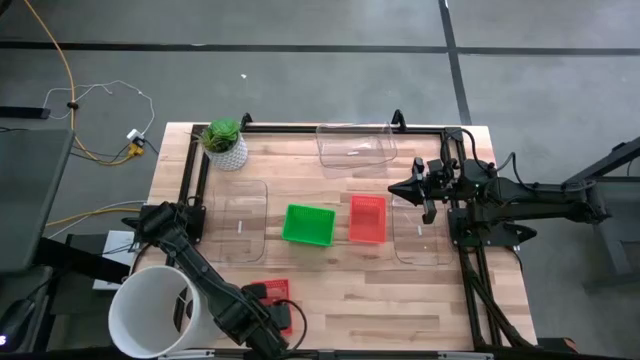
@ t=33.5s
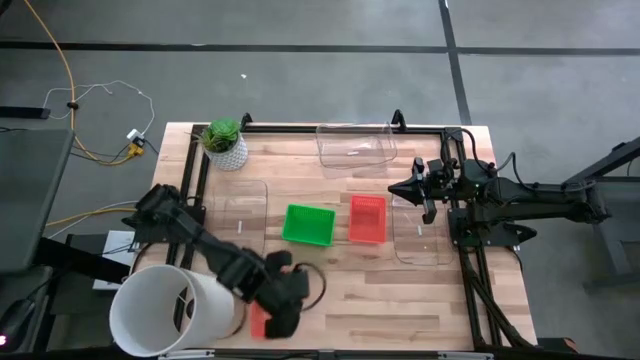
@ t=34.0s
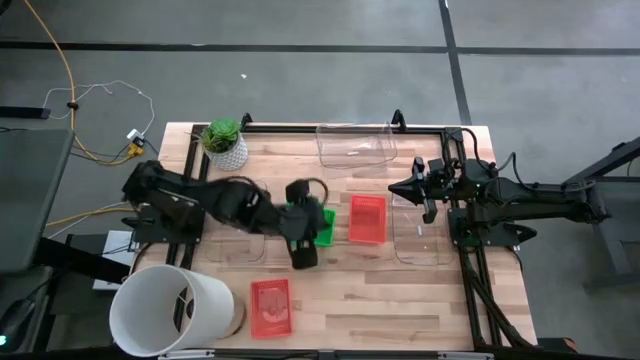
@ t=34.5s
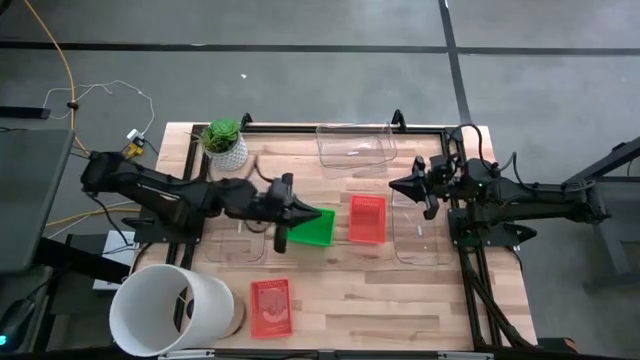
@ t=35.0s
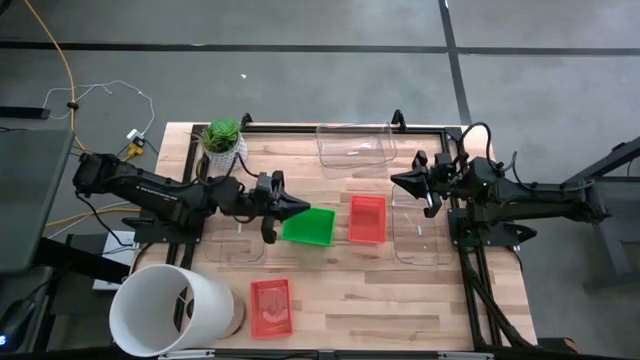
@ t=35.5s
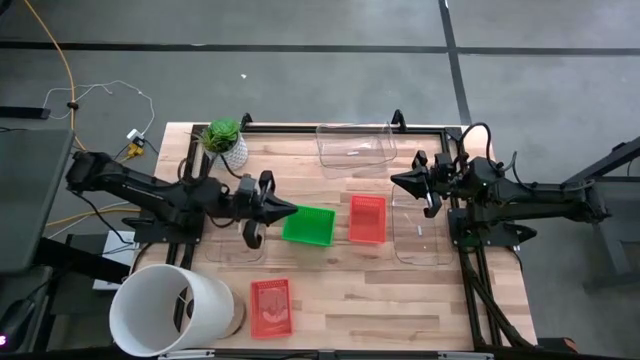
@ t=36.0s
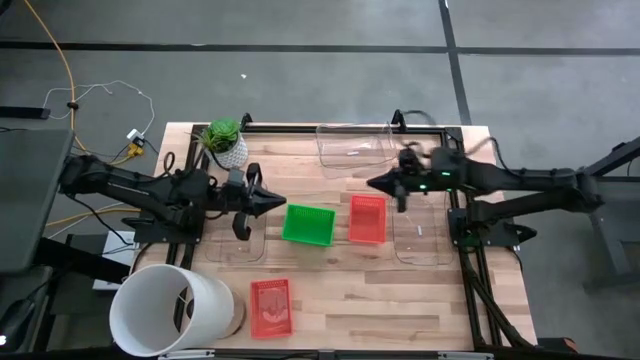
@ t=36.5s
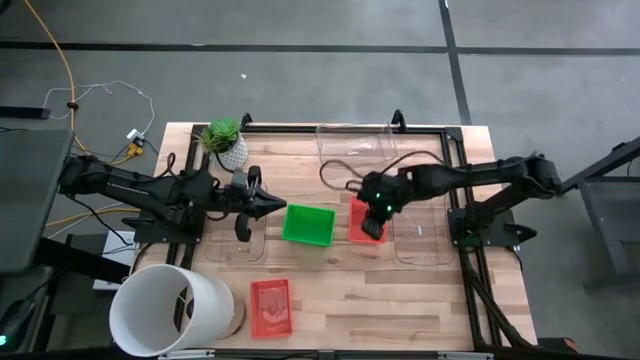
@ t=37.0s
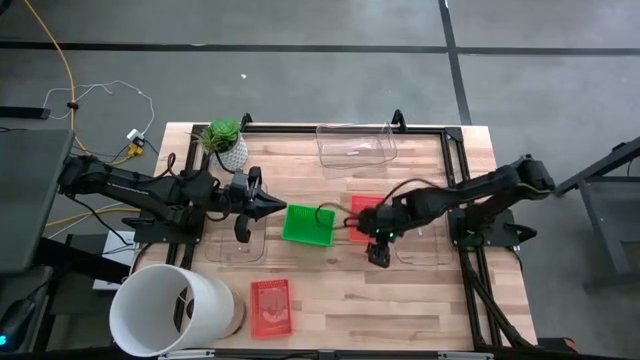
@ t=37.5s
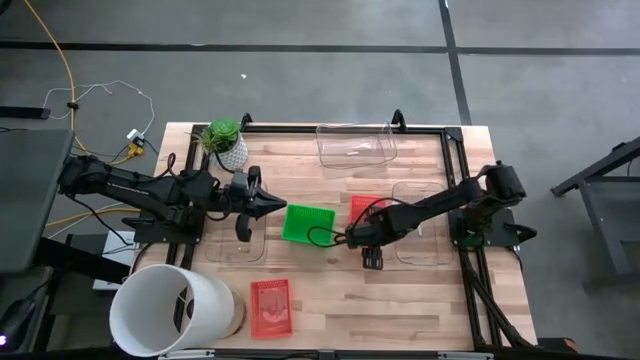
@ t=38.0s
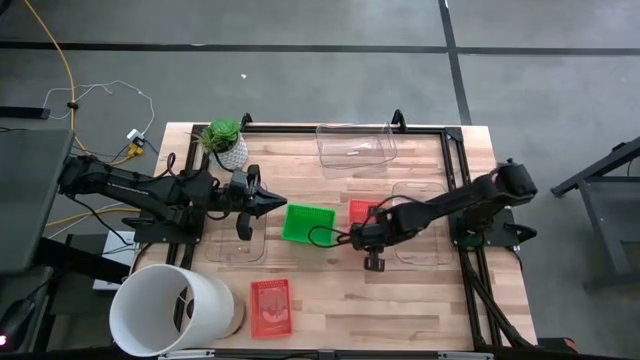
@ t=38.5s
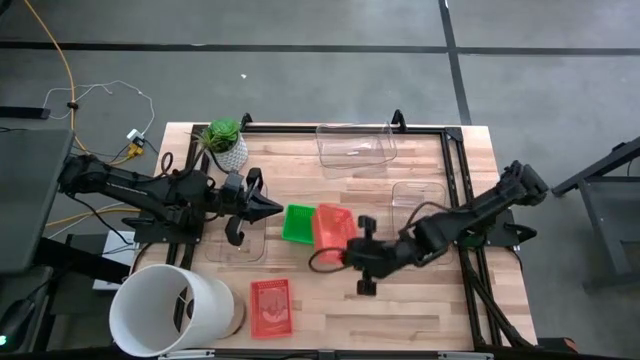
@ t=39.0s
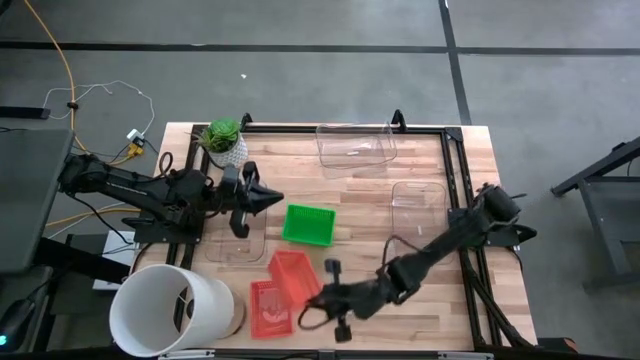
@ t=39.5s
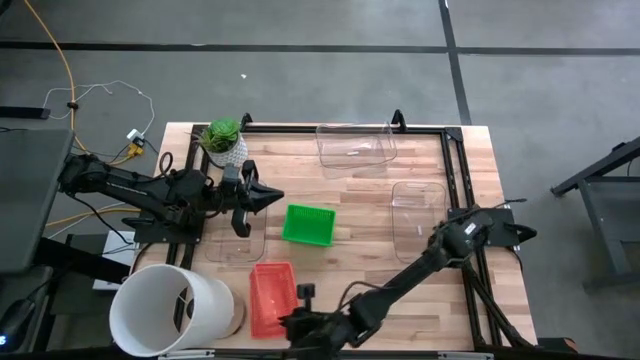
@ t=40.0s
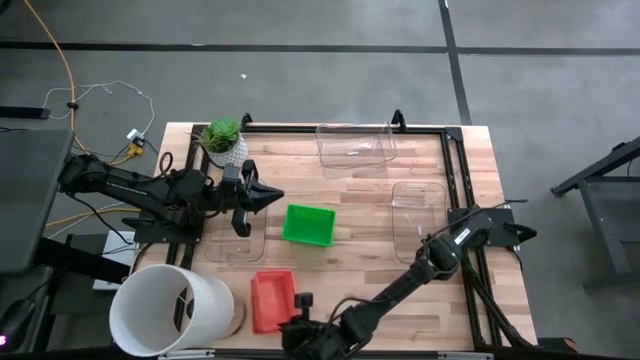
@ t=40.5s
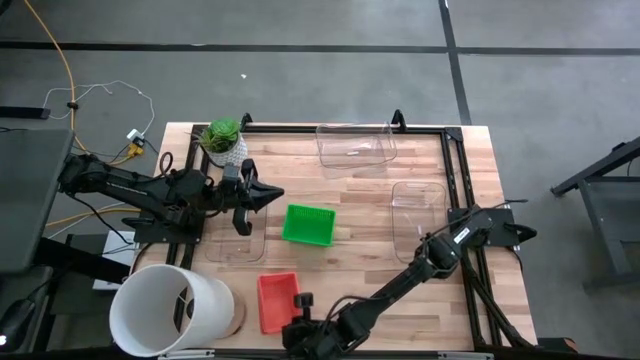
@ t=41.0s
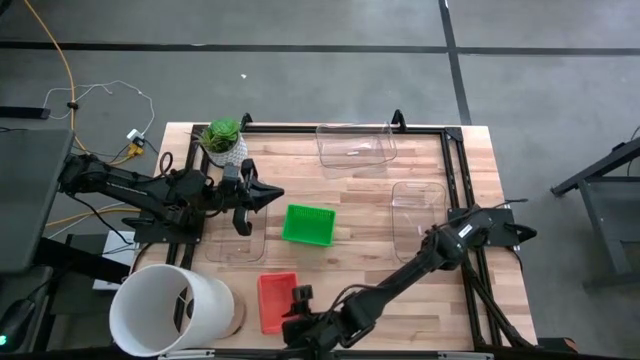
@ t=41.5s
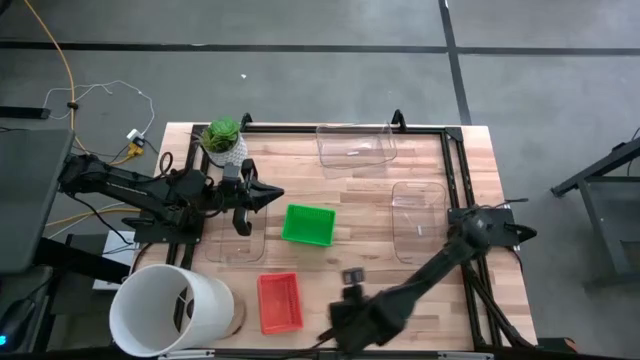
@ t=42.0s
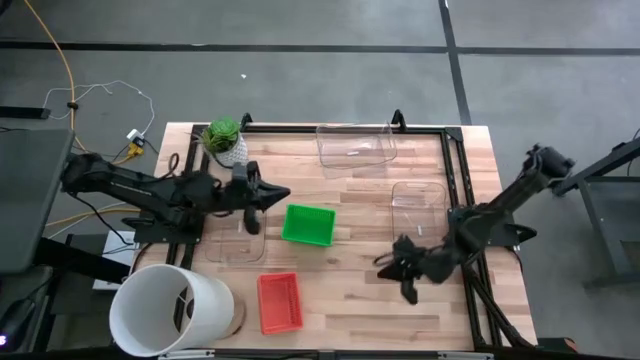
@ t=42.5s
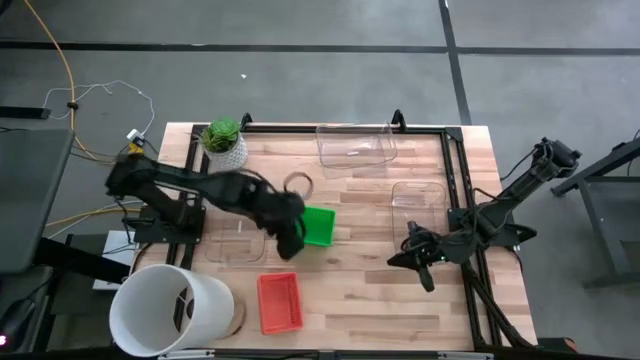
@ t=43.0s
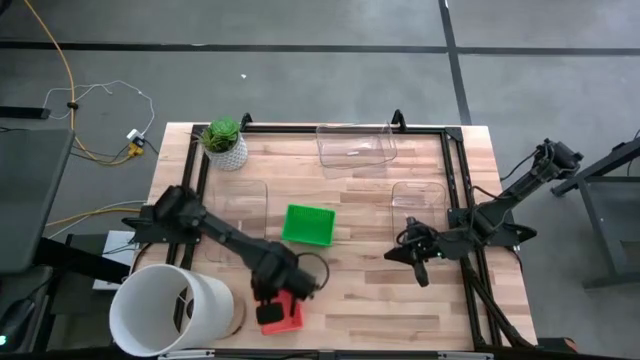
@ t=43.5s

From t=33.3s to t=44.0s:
Stack the top orange bin on the bottom orange bin
